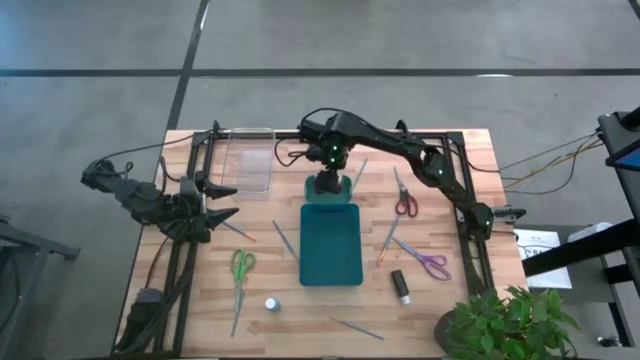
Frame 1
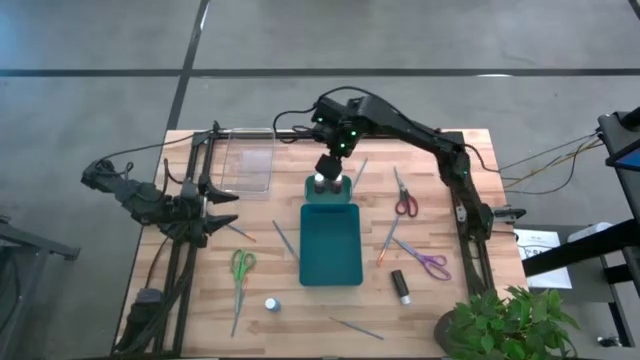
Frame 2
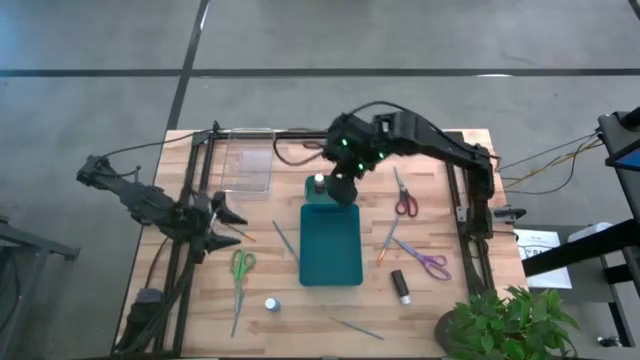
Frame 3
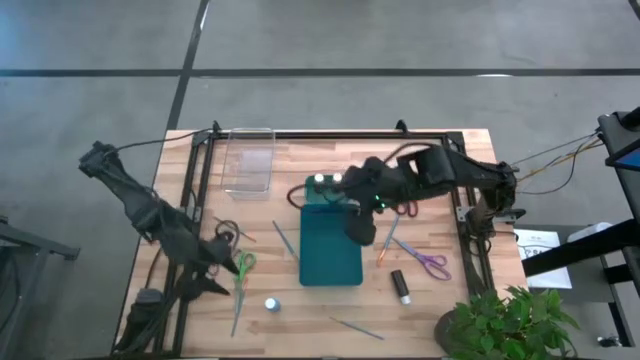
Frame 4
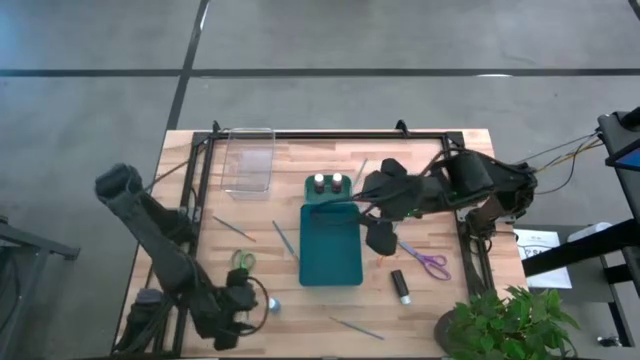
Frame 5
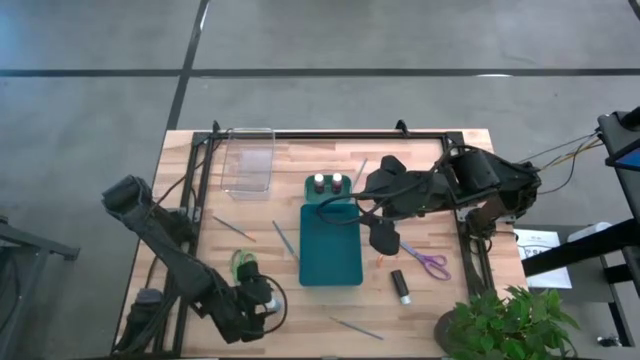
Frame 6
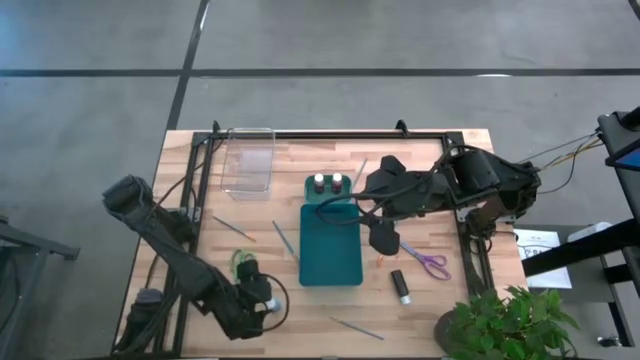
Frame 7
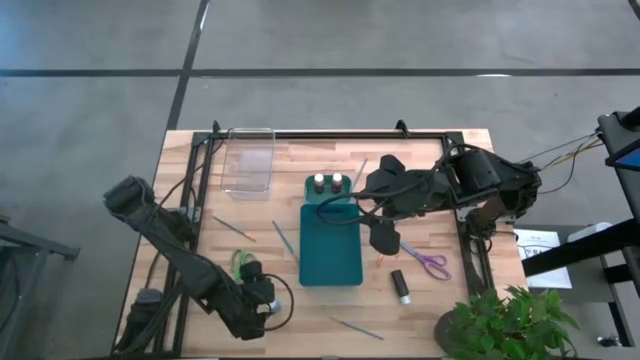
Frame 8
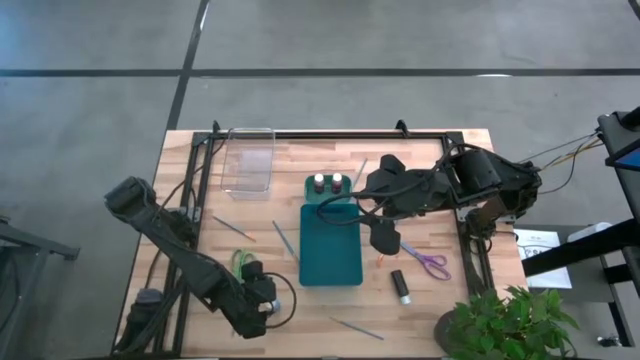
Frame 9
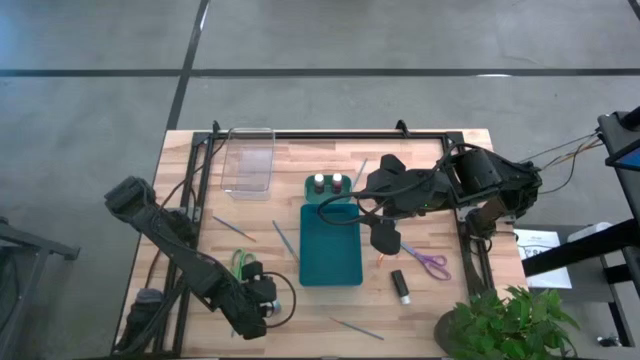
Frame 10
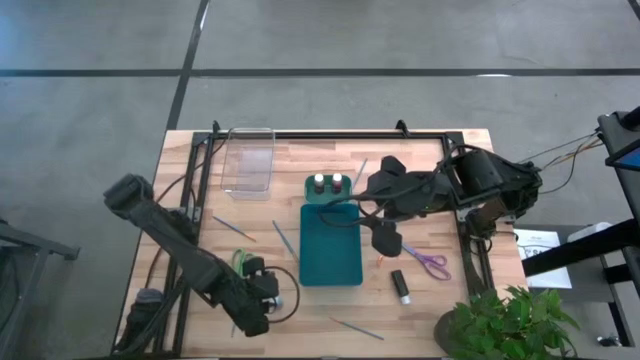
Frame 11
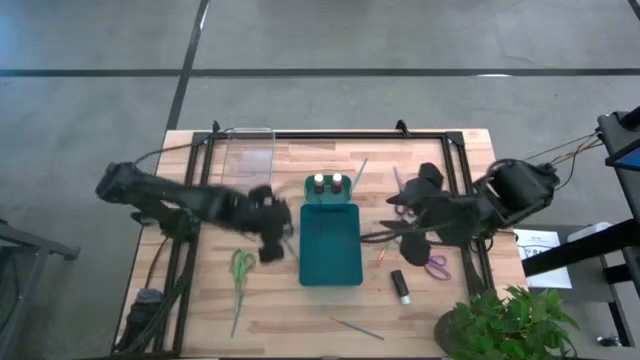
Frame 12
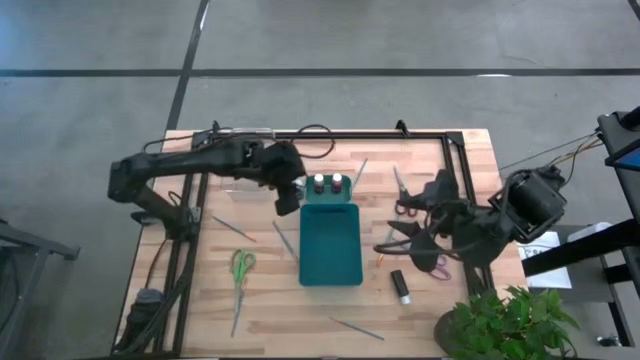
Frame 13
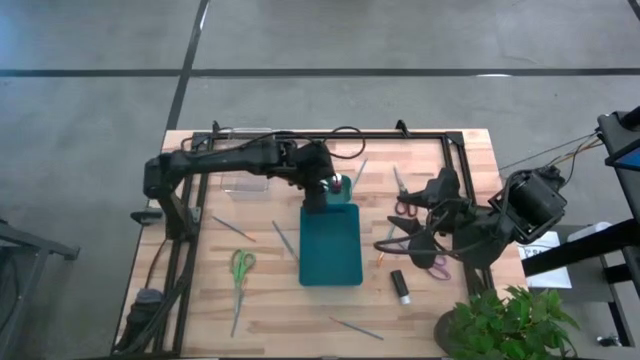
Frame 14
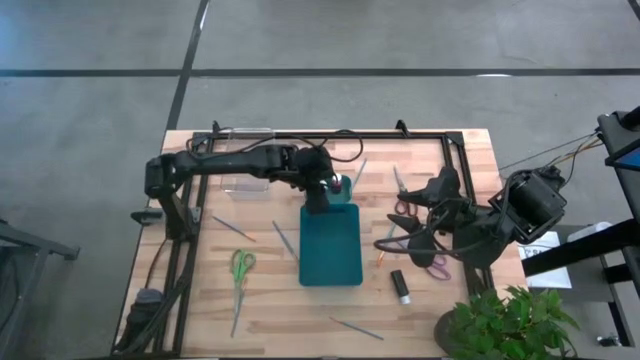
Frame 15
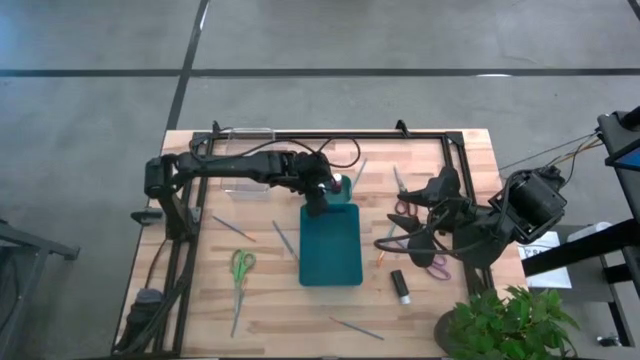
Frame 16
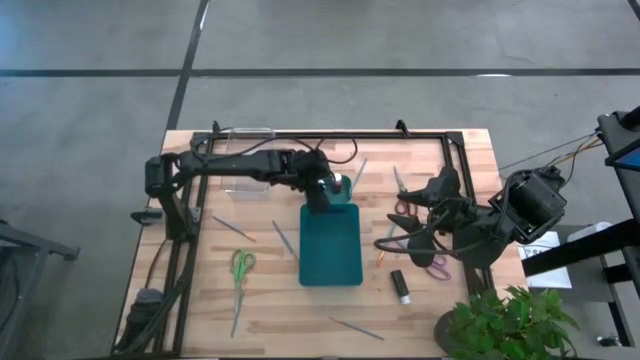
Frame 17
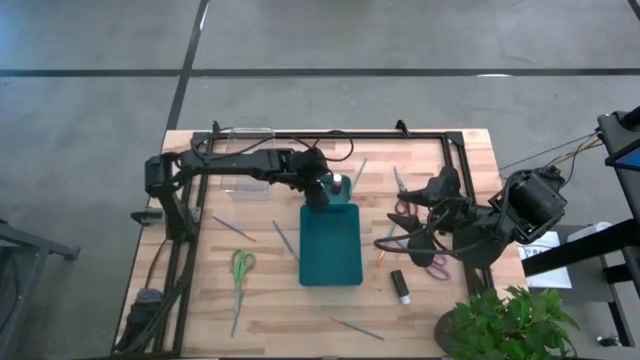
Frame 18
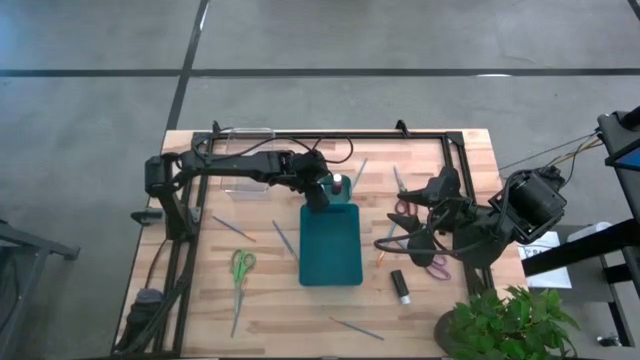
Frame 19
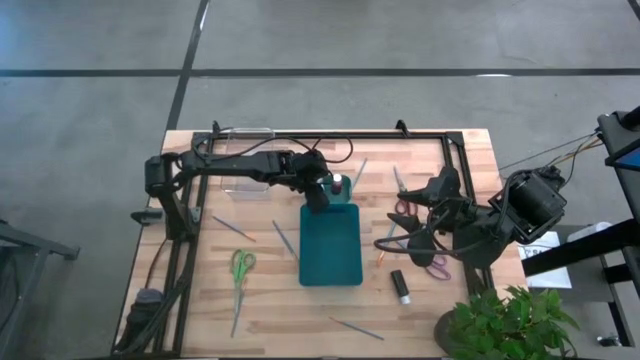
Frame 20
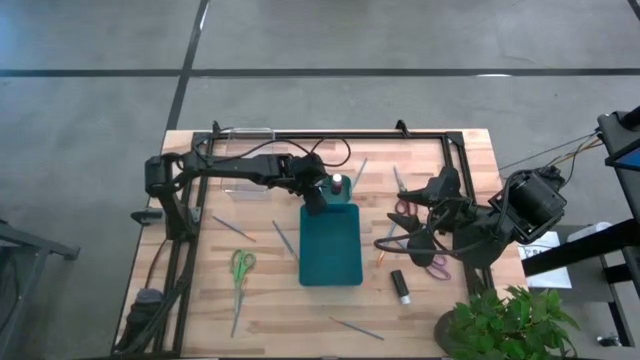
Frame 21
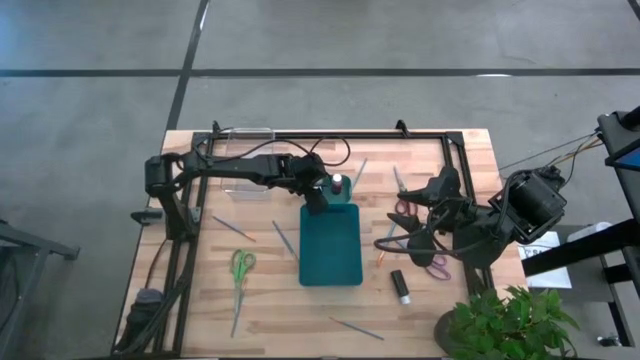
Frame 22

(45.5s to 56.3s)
Task: Pick & Place Paint Supplies
Put the blue paint bottle into the green bin

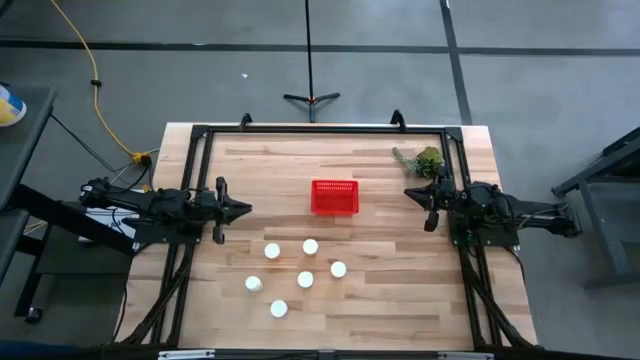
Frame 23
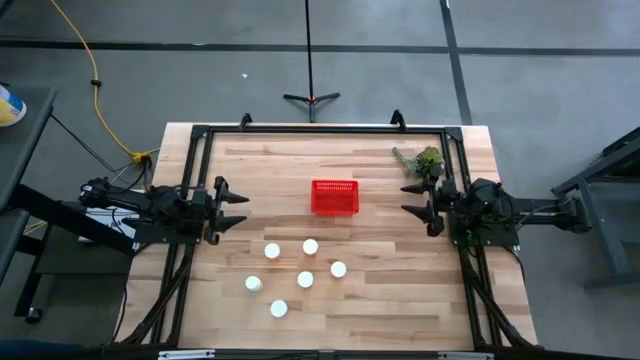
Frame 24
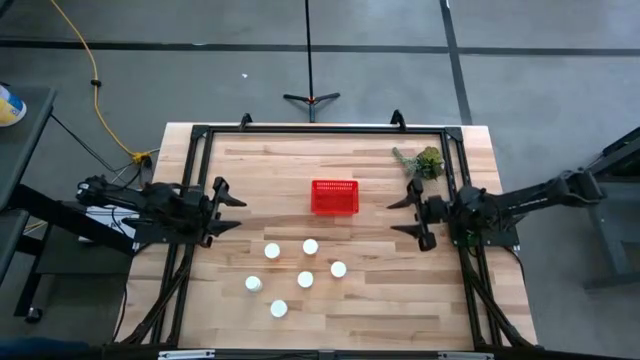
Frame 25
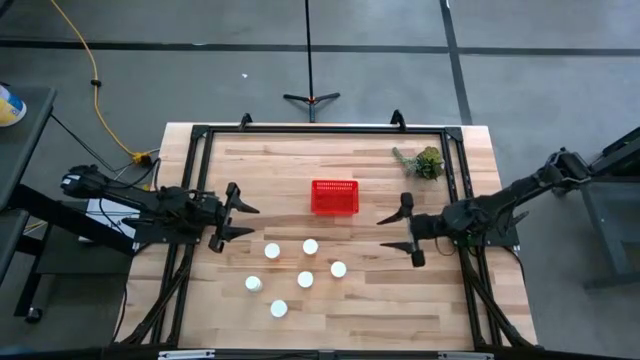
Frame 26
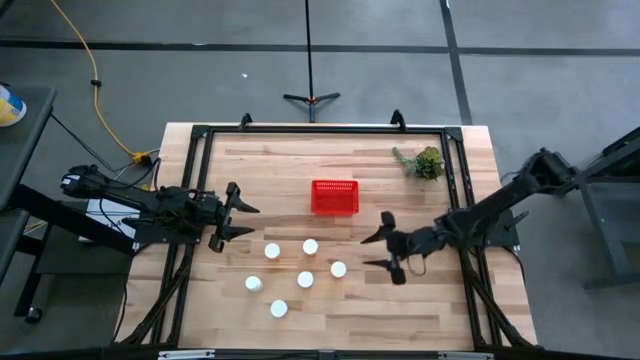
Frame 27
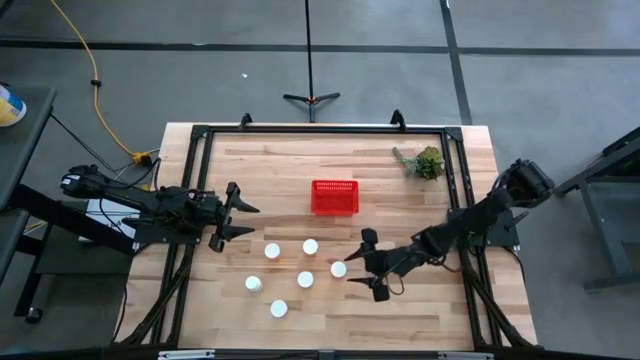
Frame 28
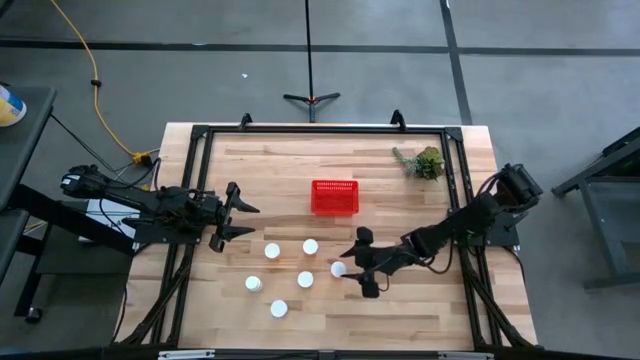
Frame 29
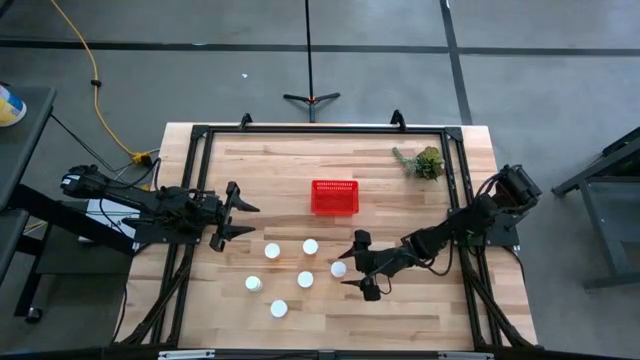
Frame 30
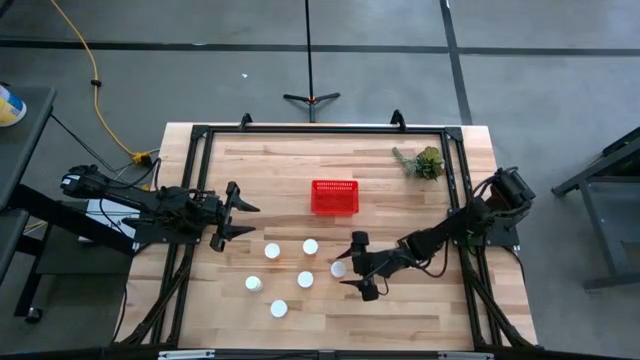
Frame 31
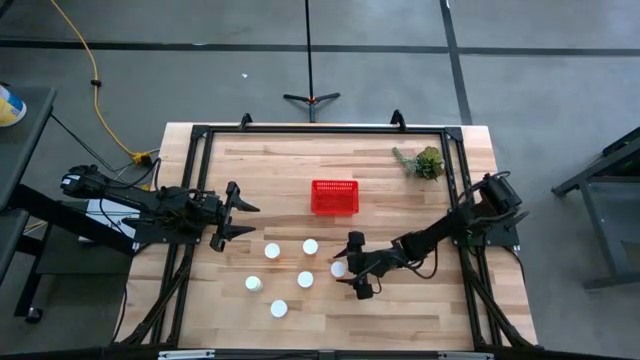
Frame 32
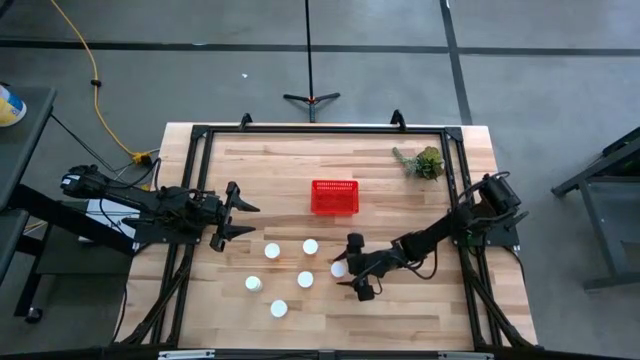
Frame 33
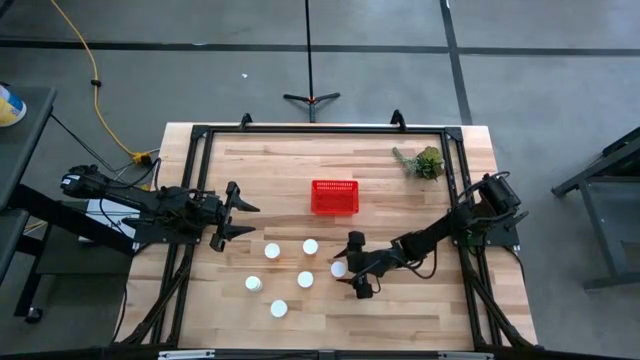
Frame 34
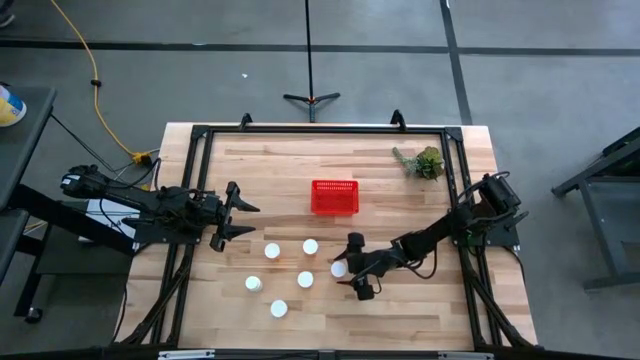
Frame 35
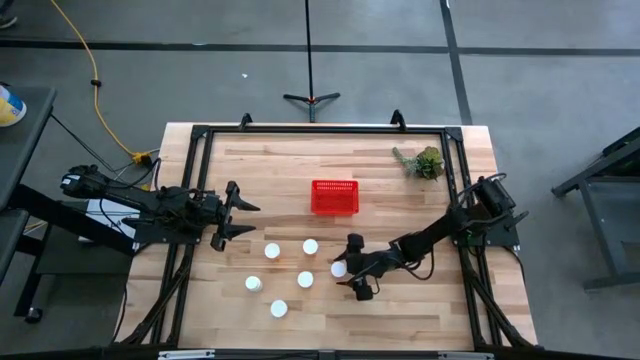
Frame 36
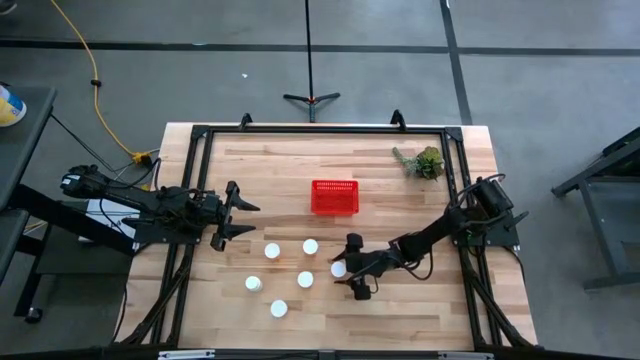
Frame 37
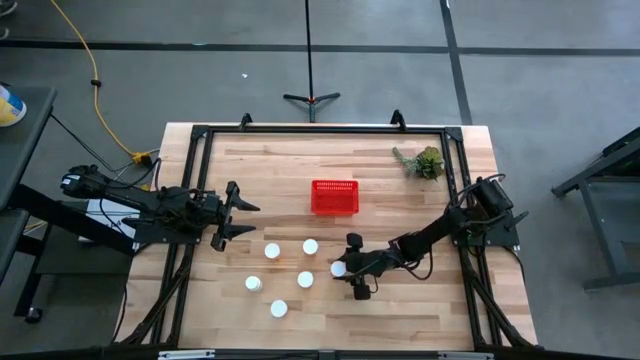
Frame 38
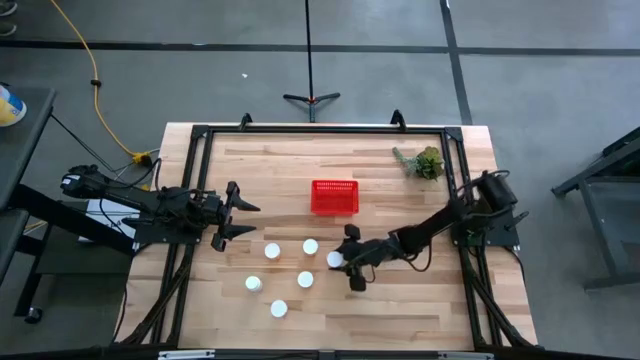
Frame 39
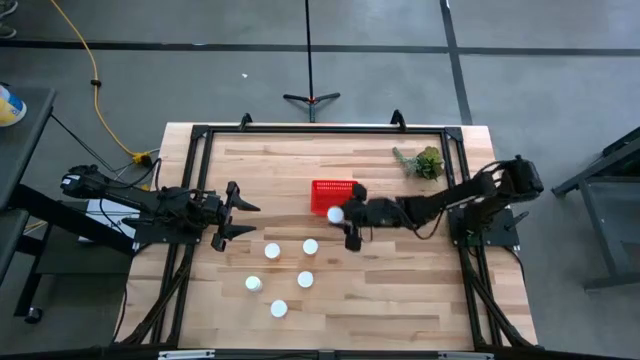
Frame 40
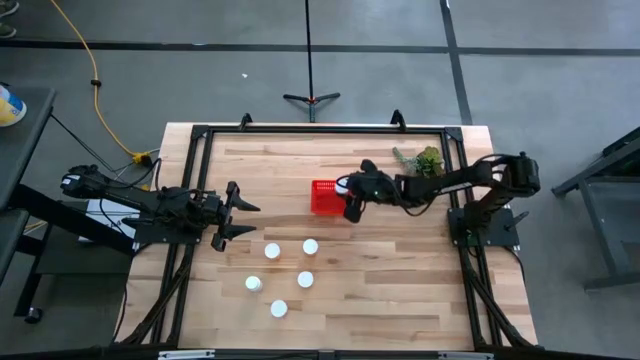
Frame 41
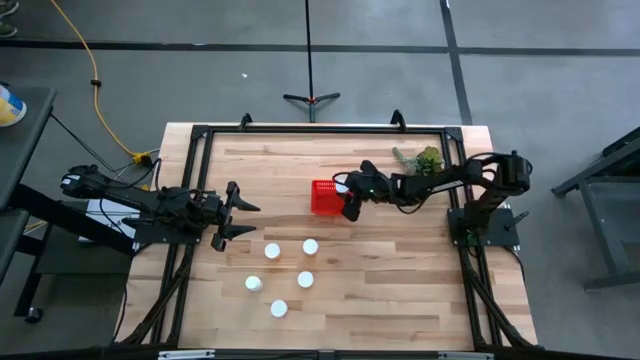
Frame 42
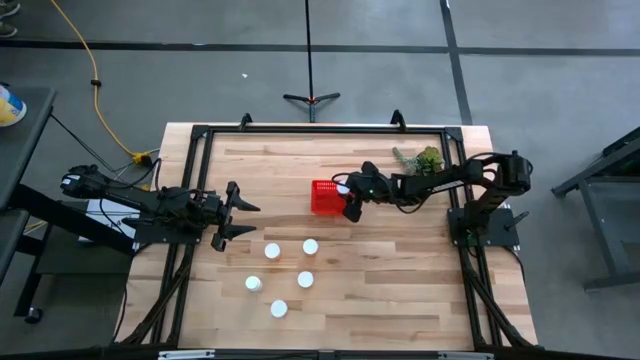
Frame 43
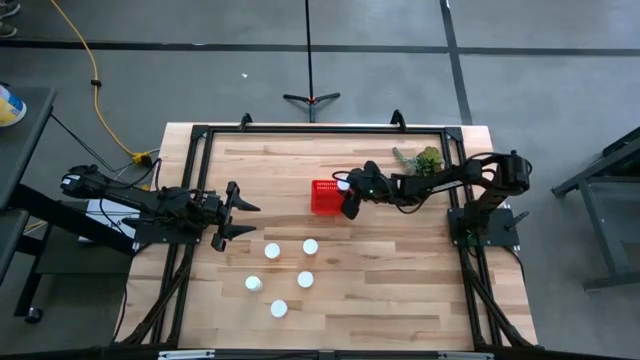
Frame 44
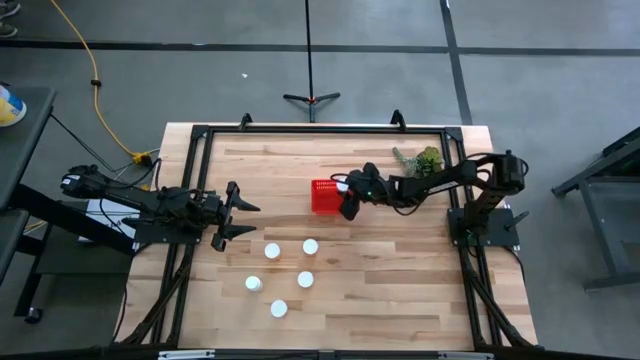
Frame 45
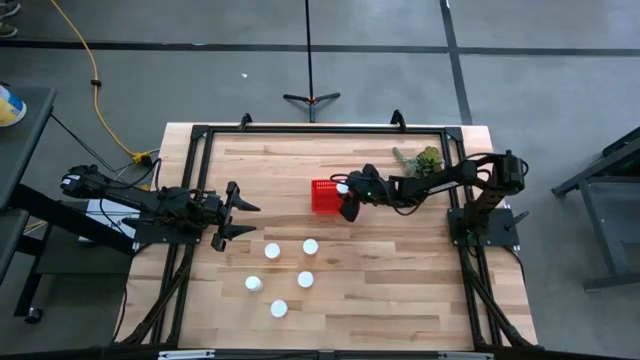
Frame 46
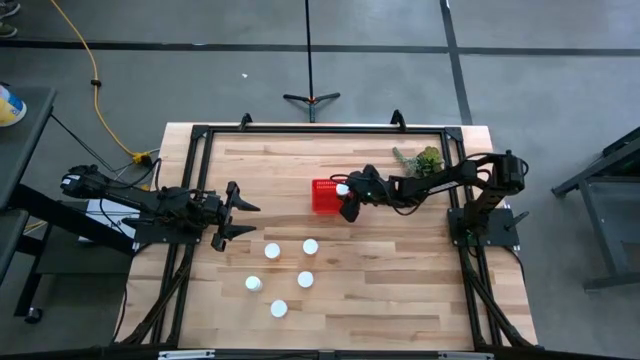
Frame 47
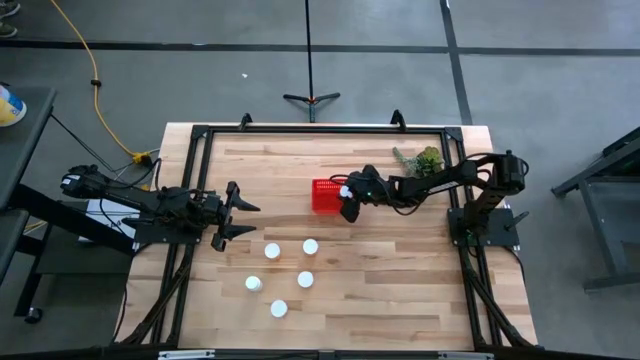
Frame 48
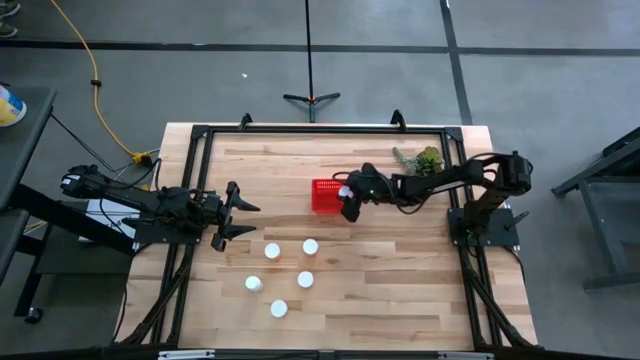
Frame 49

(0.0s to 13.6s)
Task: Pick and place pill bottles into a basket
Put the orange pill bottle into the red bin
